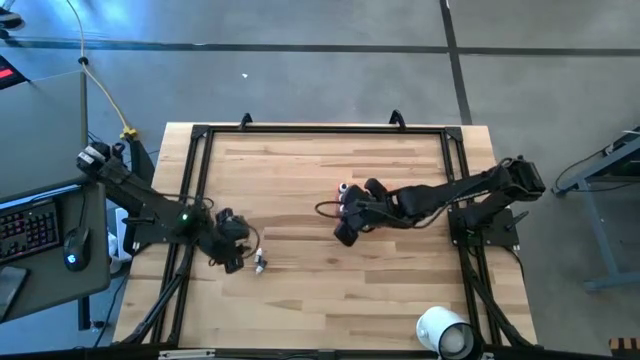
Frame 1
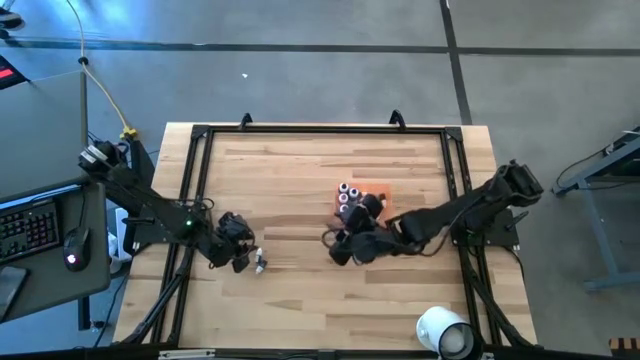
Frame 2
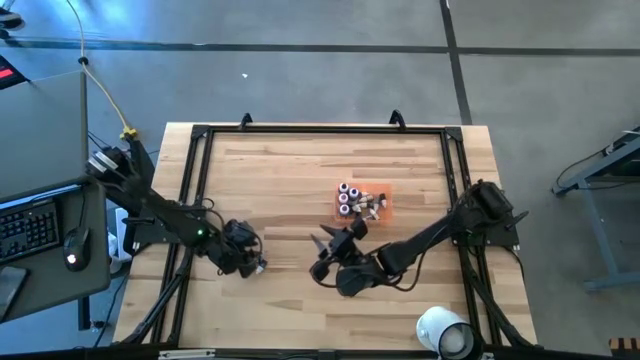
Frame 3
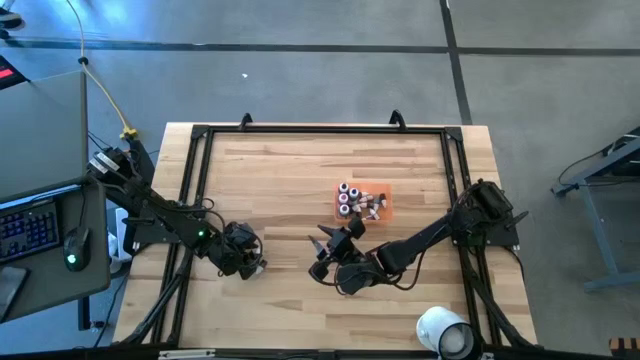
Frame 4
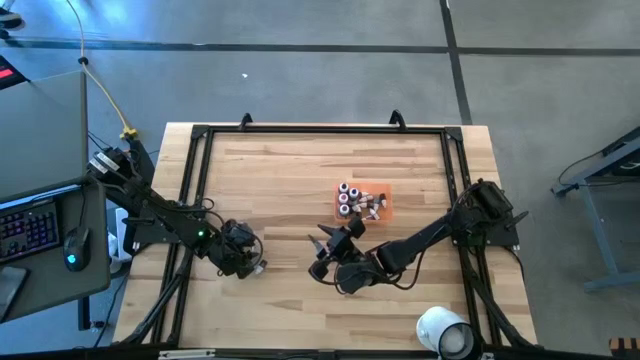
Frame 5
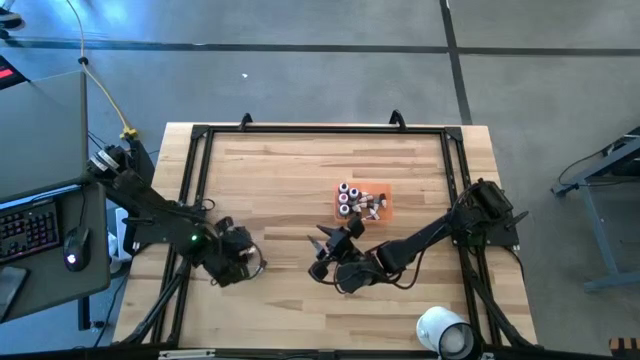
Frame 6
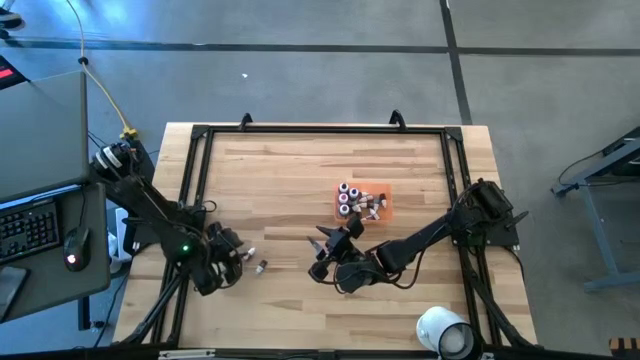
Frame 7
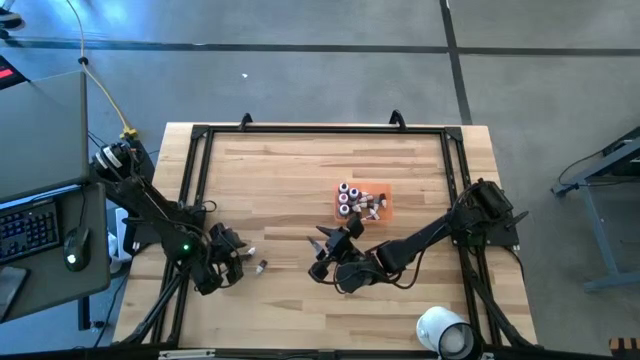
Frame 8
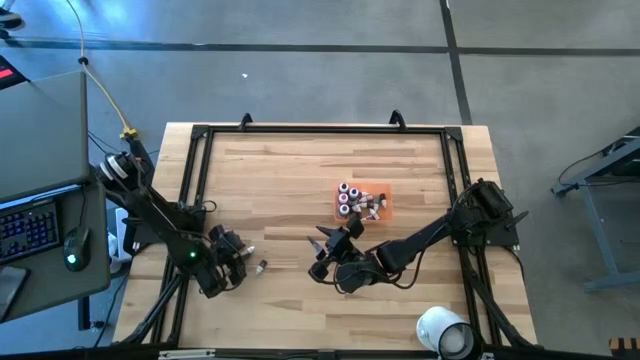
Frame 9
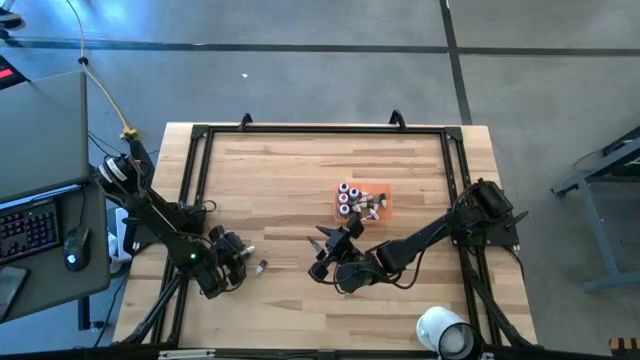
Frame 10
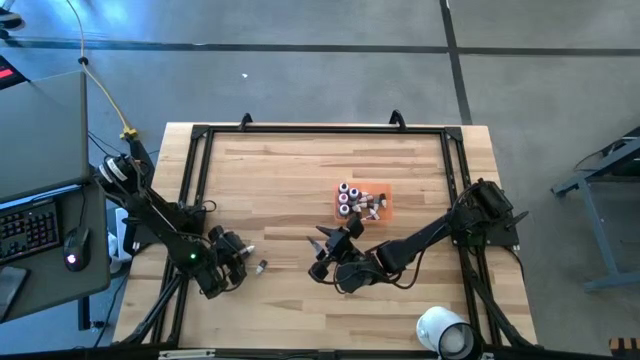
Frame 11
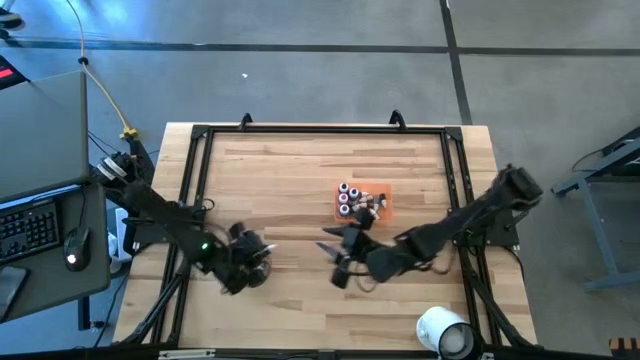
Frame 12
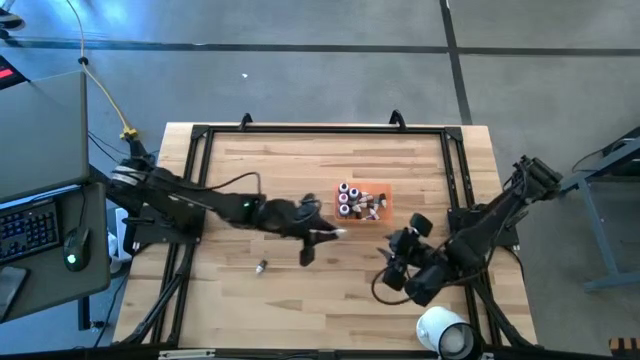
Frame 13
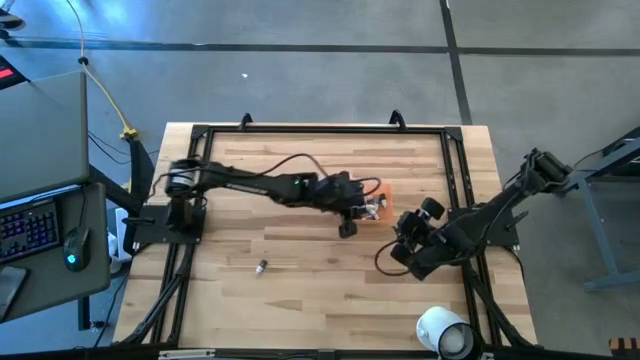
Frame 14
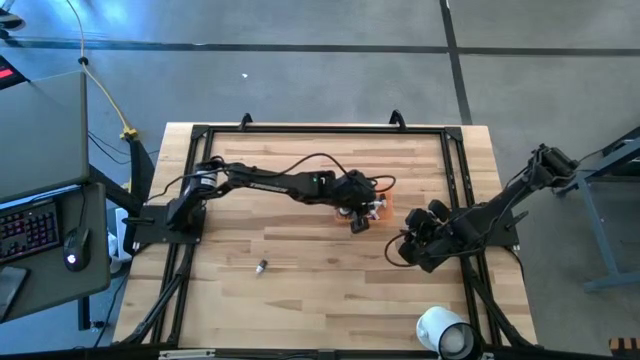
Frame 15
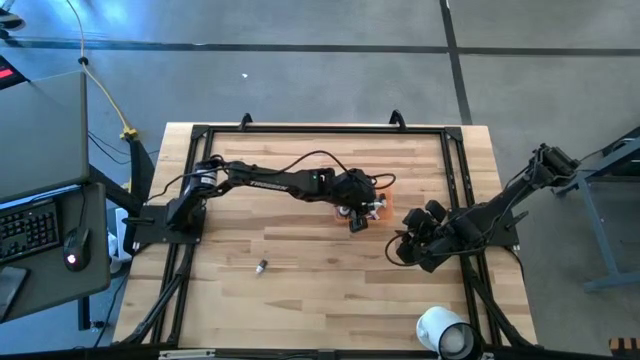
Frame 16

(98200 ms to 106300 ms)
Task: Pick & Place food coloring
Put the small purple food coloring bottle into the orange bin

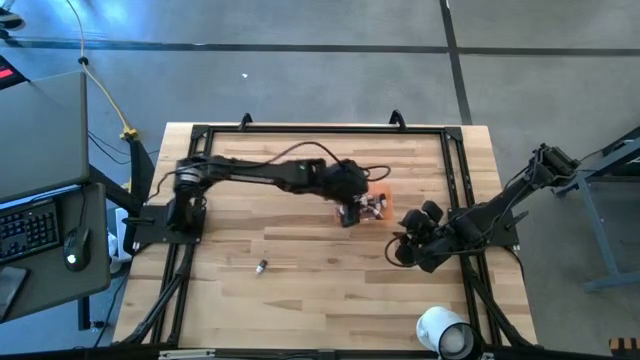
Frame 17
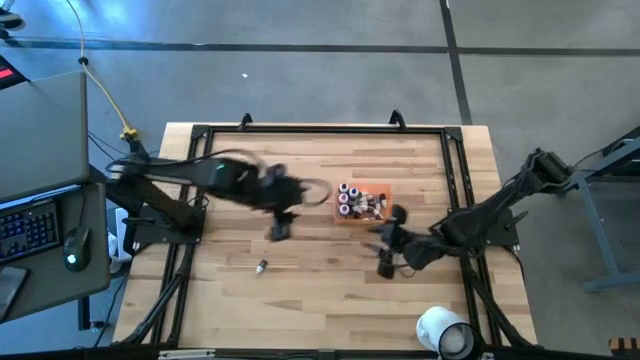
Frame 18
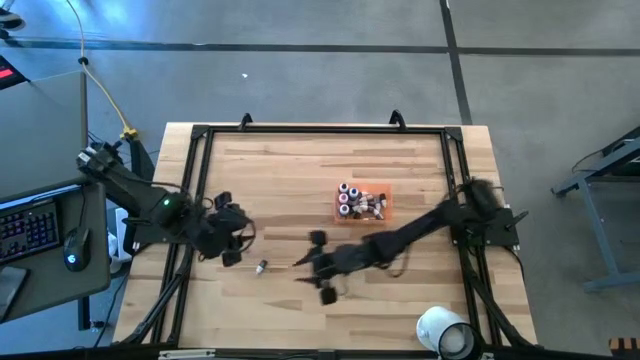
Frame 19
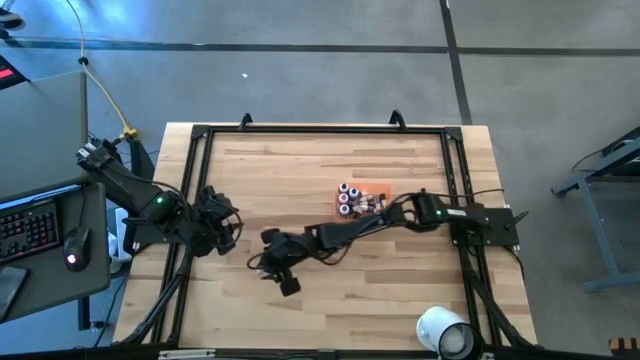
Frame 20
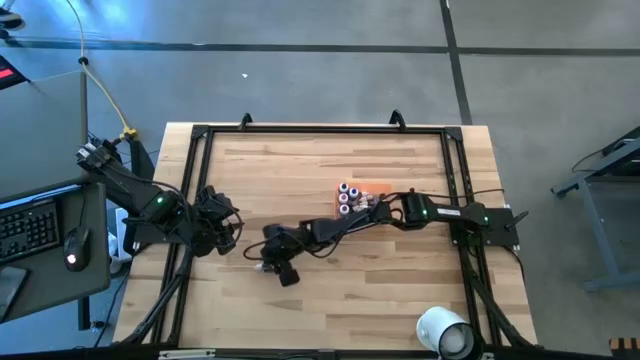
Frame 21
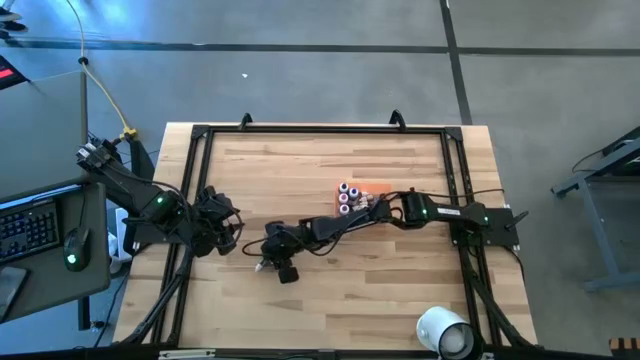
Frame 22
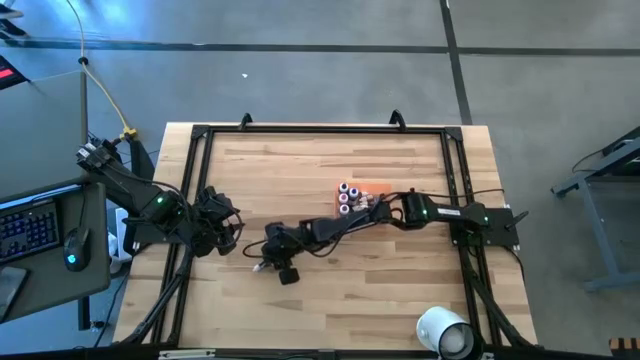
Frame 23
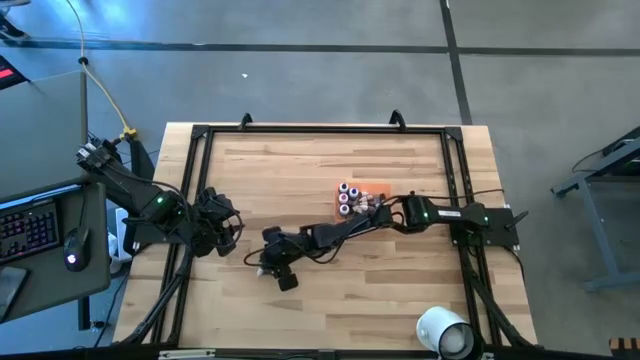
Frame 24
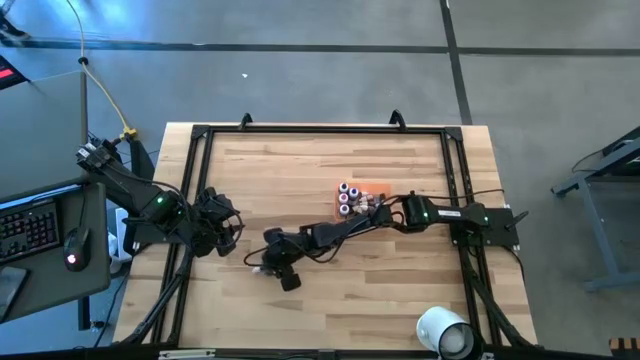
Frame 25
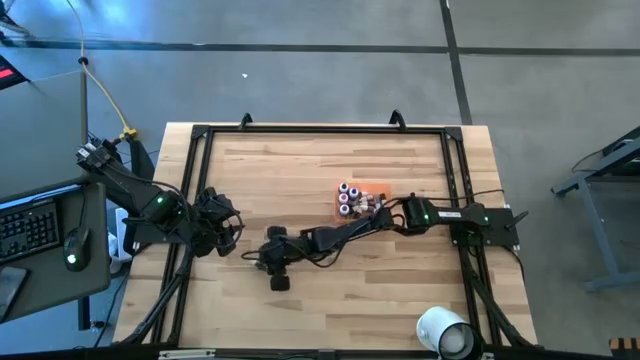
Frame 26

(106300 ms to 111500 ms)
Put the small green food coloring bottle into the orange bin

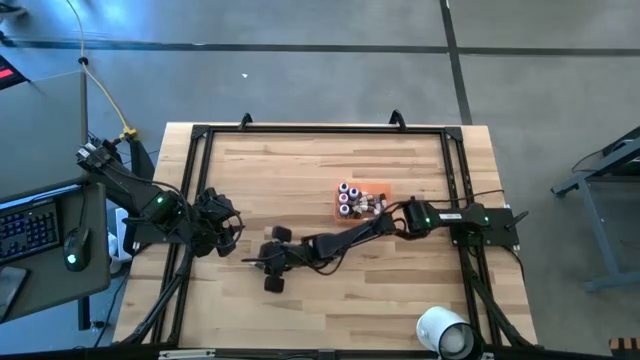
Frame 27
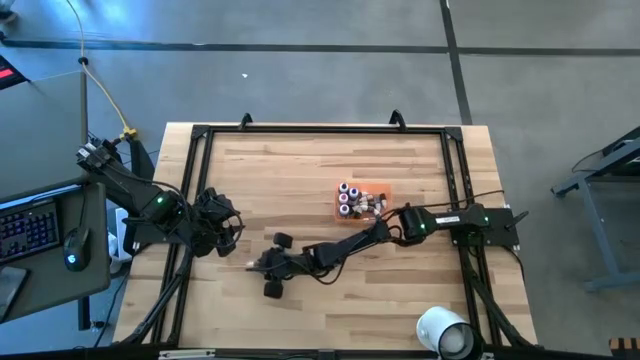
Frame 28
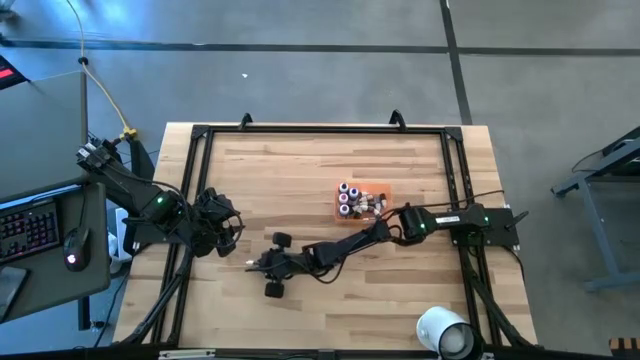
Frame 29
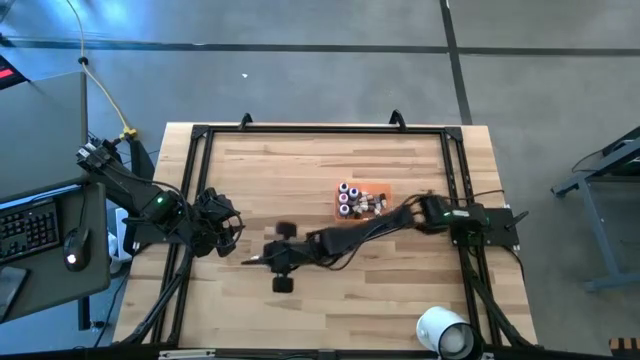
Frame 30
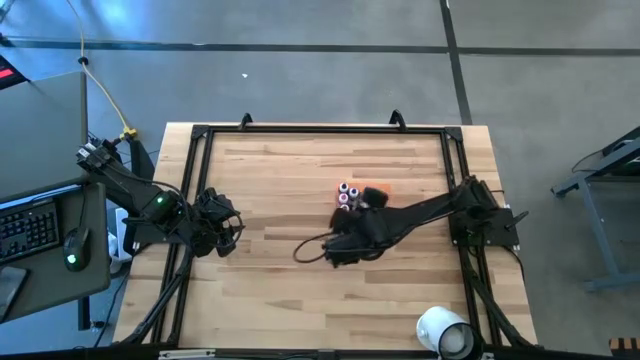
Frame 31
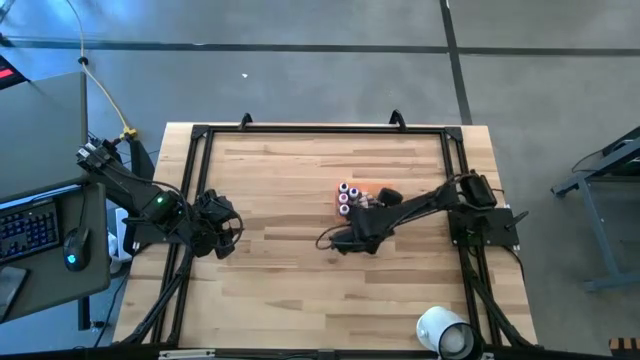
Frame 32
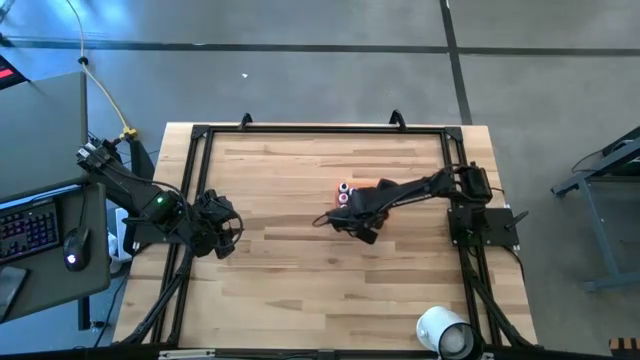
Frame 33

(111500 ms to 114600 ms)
Put the small green food coloring bottle into the orange bin

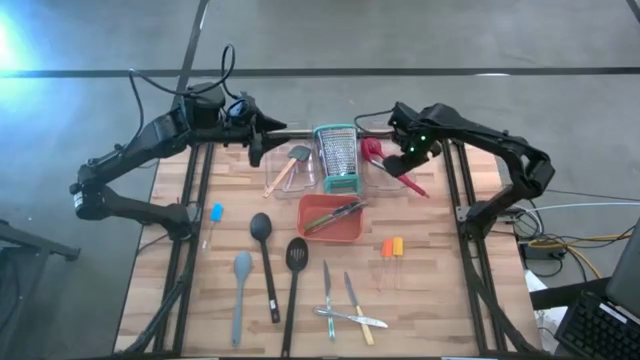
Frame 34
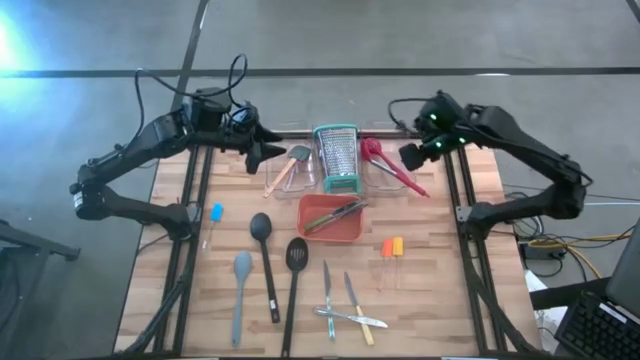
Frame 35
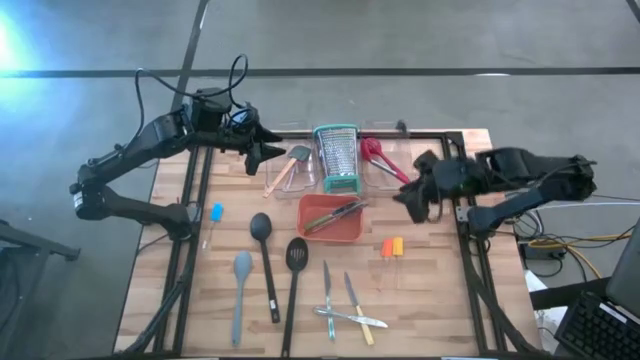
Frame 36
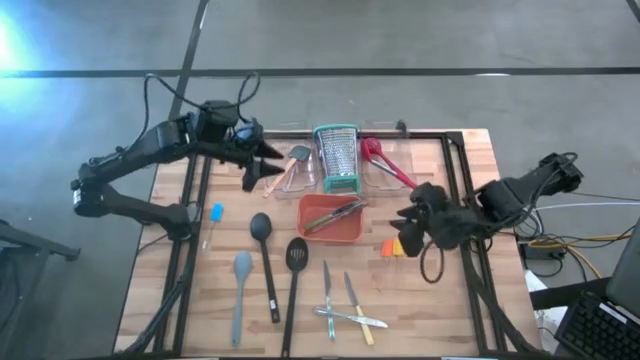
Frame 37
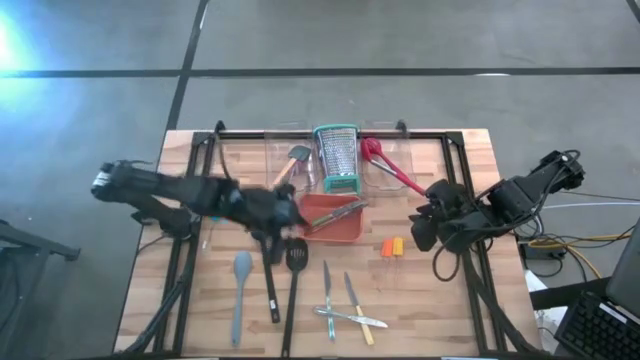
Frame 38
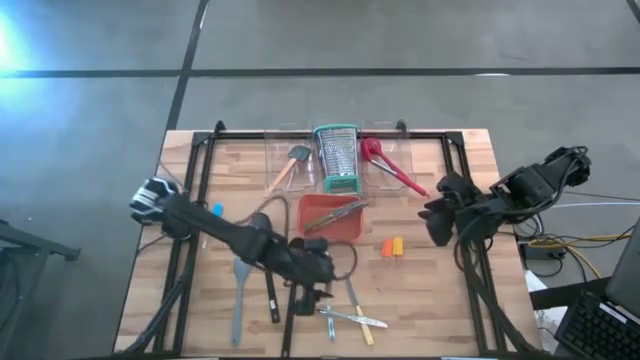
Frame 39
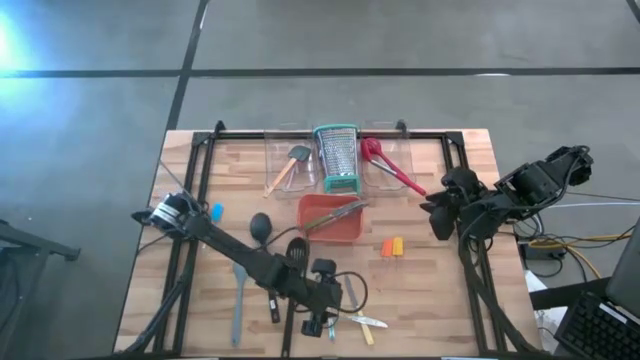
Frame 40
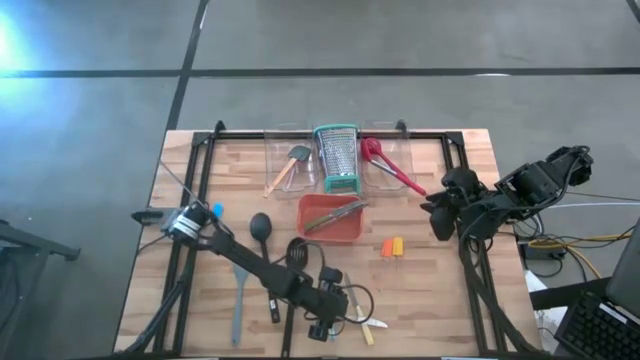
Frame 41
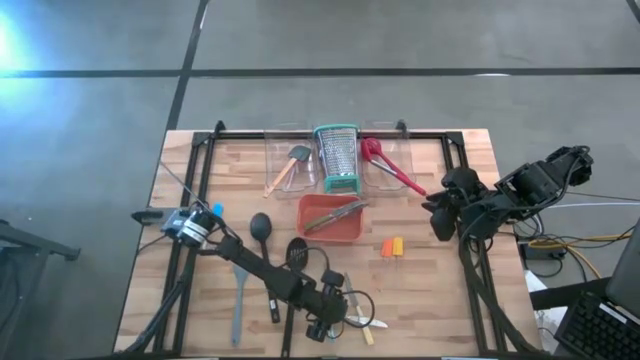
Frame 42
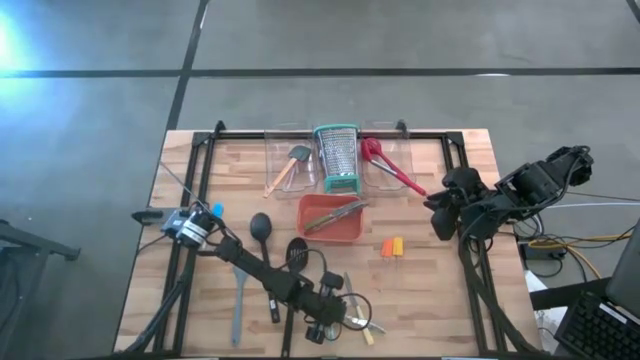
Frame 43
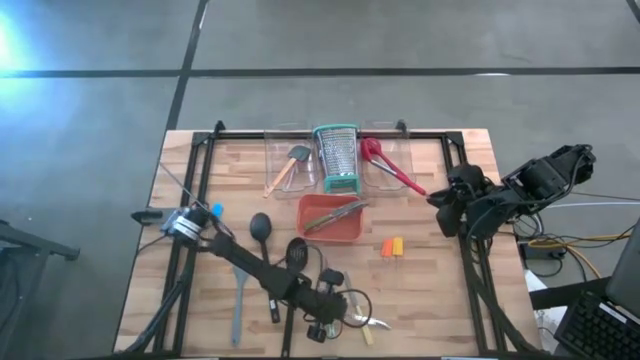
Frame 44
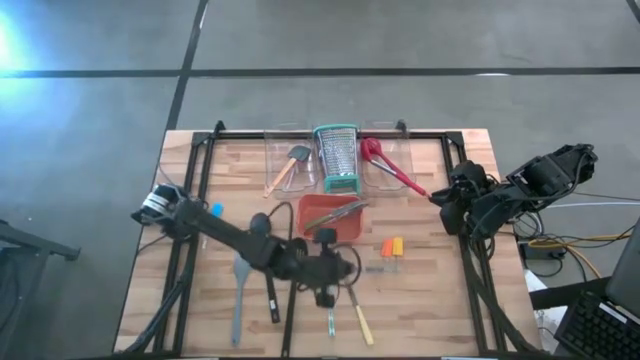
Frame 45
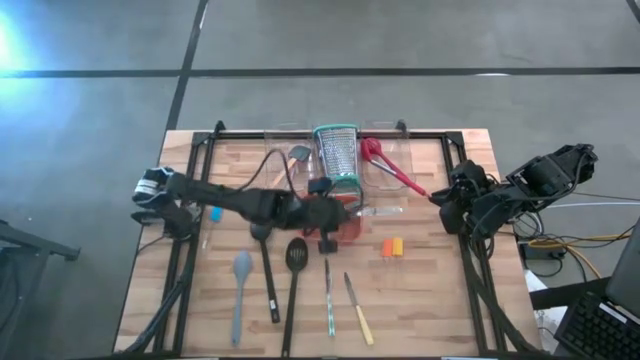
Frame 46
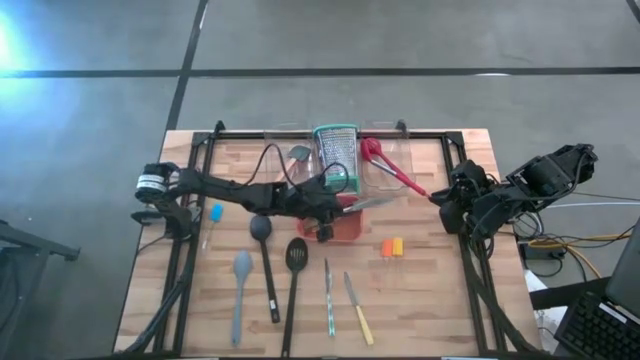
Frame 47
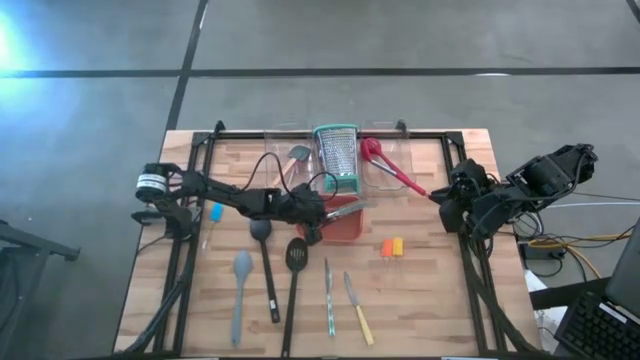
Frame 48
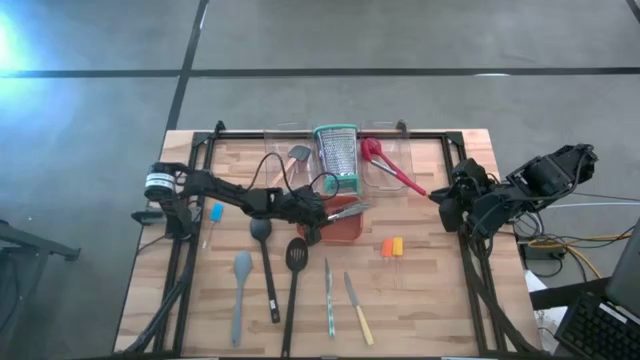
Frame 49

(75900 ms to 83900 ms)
Task: Pick & Place Kitchen Items
Put the silver knife into the orange bin
